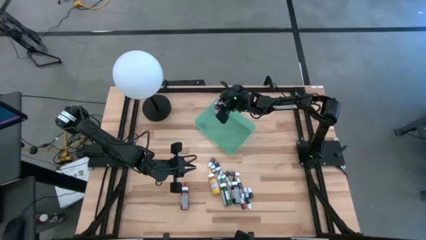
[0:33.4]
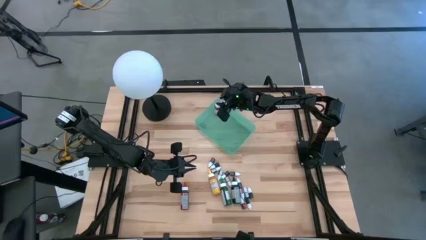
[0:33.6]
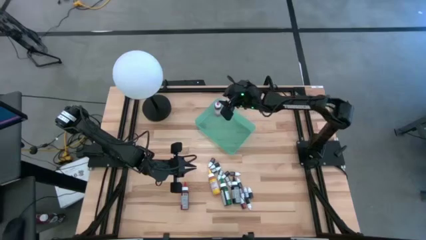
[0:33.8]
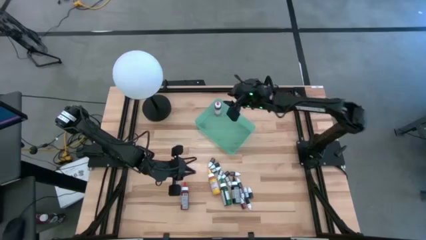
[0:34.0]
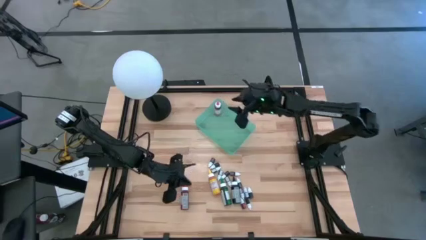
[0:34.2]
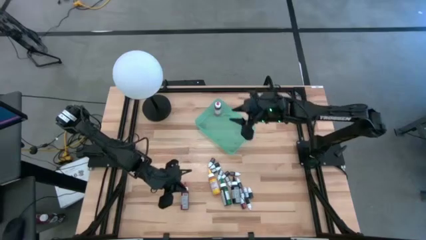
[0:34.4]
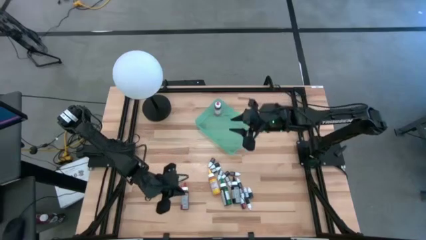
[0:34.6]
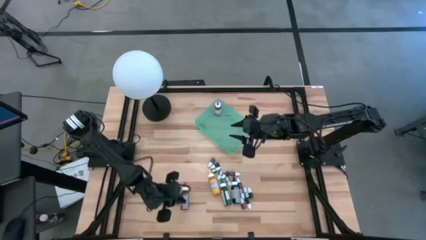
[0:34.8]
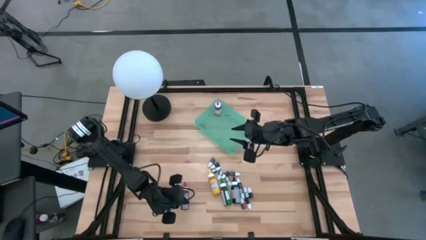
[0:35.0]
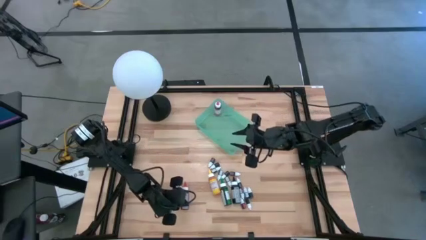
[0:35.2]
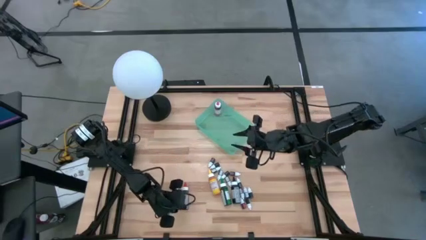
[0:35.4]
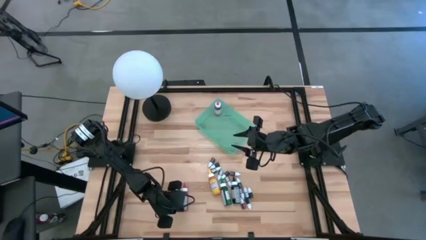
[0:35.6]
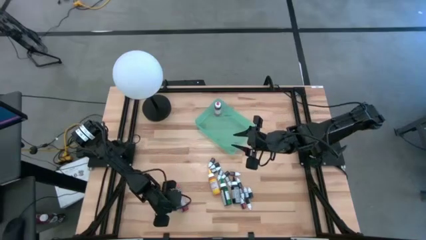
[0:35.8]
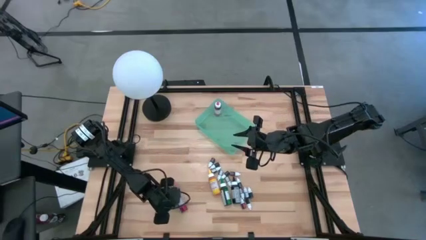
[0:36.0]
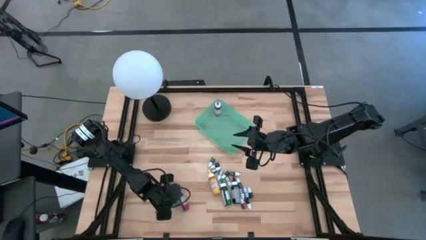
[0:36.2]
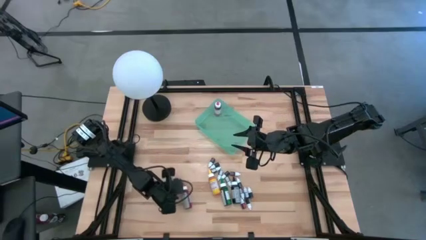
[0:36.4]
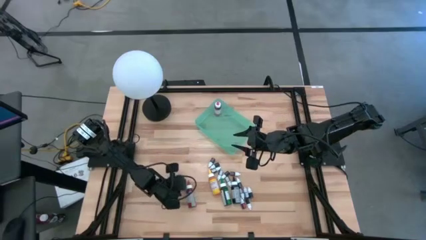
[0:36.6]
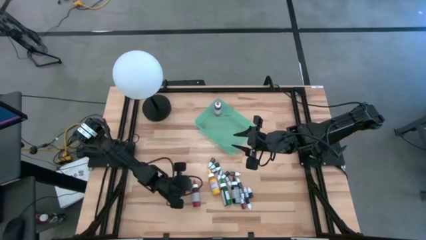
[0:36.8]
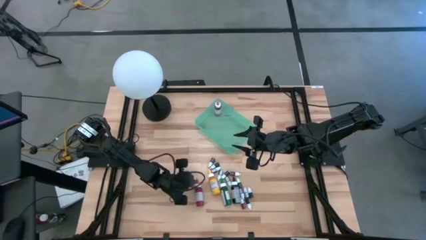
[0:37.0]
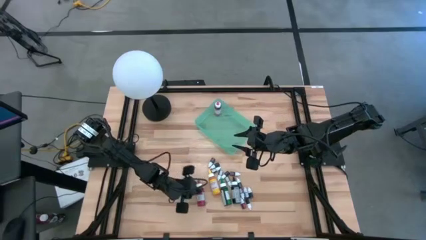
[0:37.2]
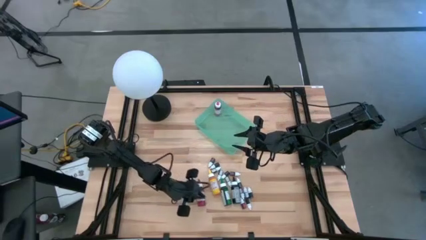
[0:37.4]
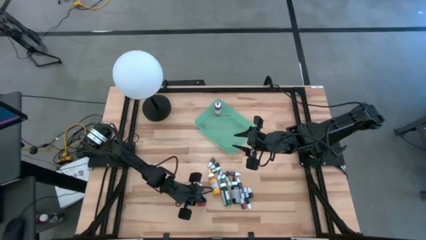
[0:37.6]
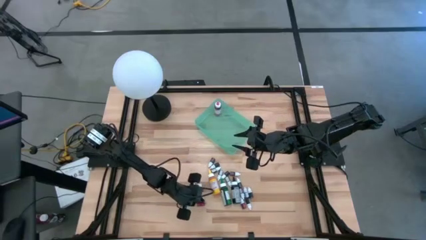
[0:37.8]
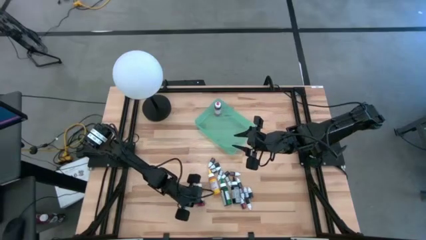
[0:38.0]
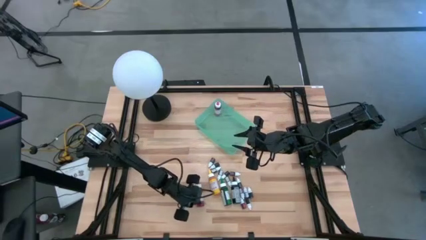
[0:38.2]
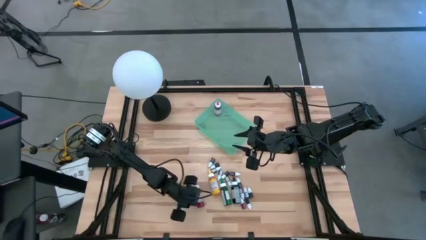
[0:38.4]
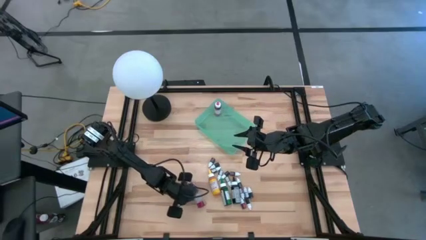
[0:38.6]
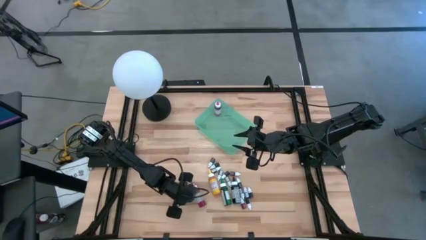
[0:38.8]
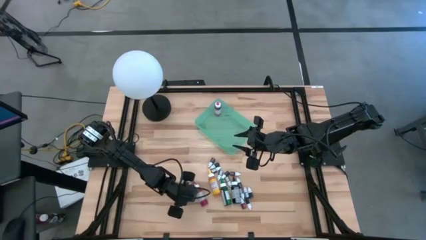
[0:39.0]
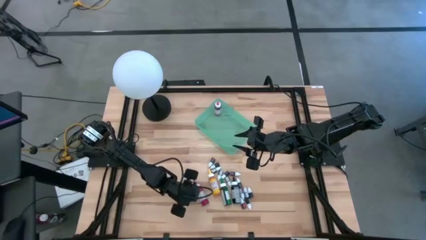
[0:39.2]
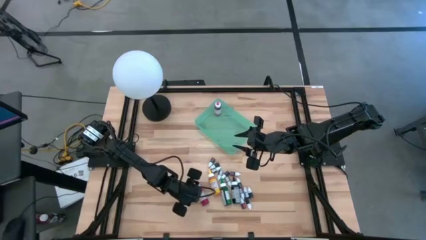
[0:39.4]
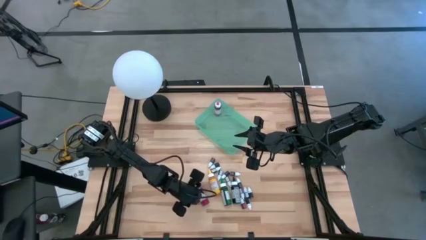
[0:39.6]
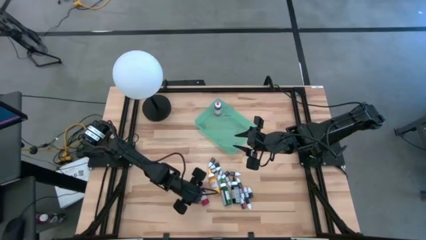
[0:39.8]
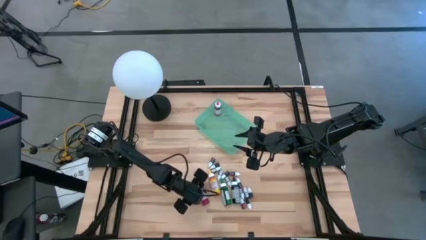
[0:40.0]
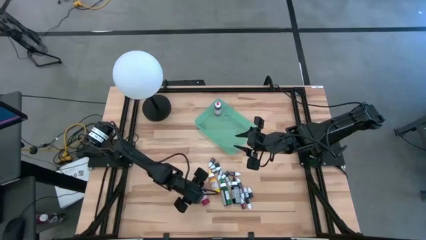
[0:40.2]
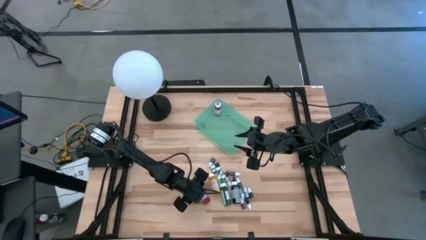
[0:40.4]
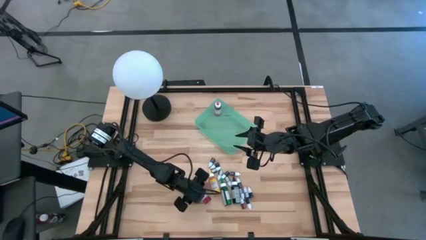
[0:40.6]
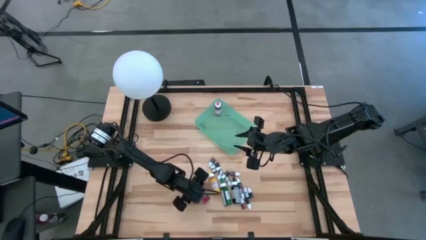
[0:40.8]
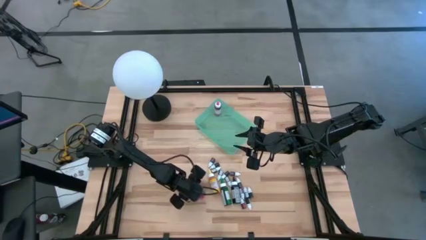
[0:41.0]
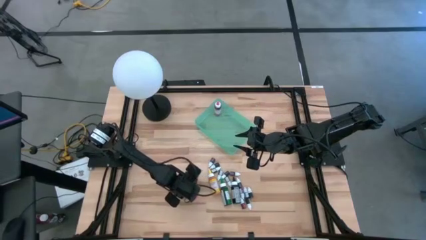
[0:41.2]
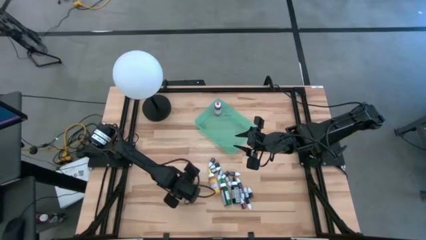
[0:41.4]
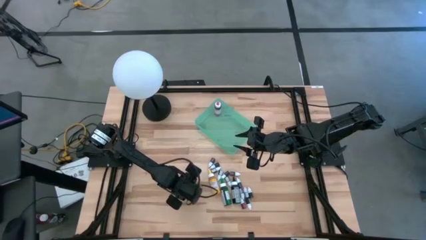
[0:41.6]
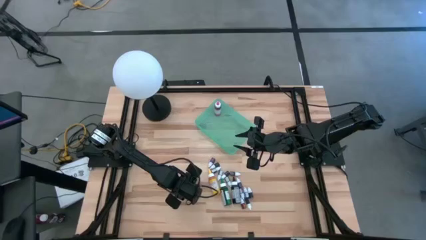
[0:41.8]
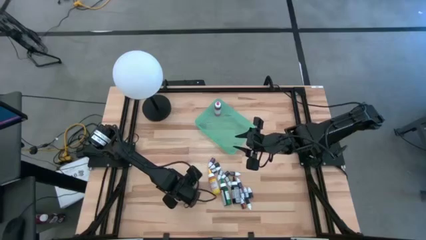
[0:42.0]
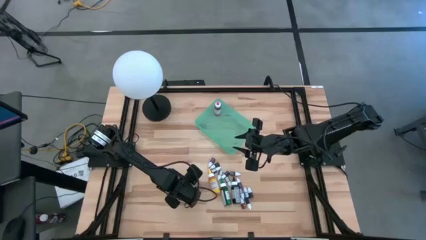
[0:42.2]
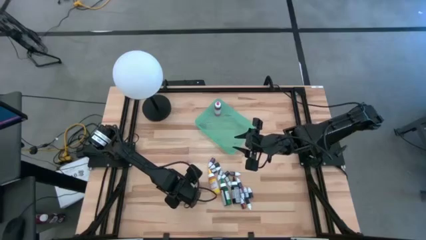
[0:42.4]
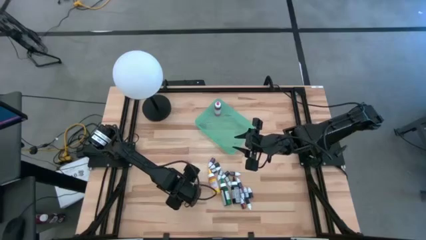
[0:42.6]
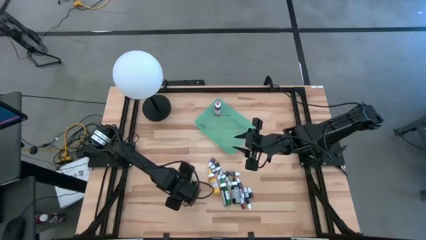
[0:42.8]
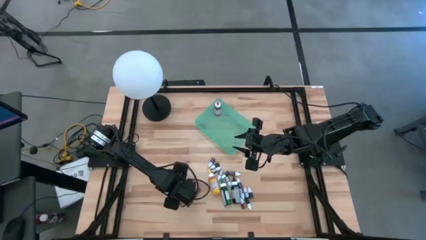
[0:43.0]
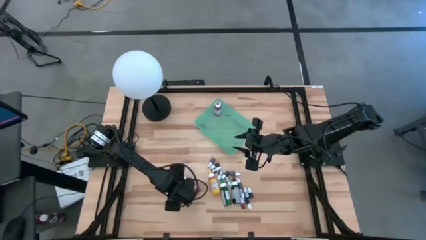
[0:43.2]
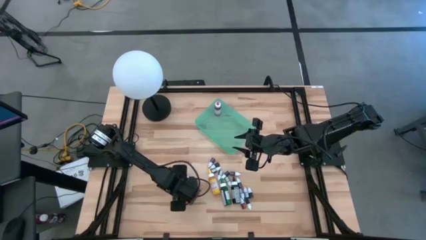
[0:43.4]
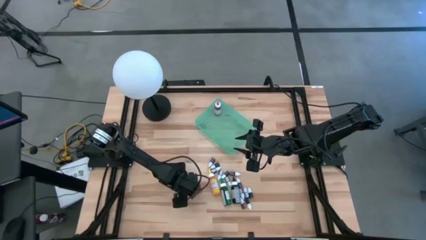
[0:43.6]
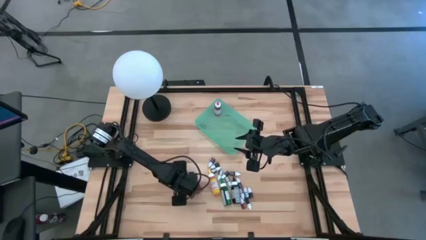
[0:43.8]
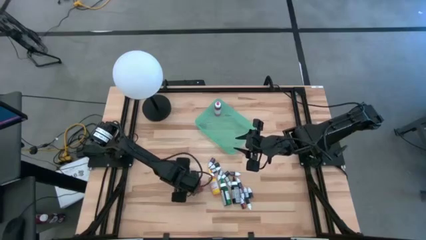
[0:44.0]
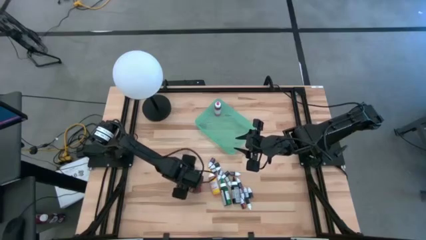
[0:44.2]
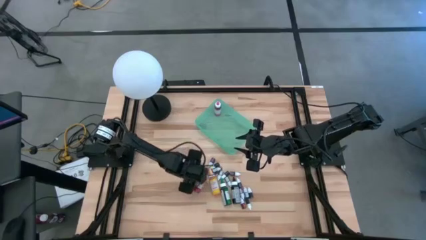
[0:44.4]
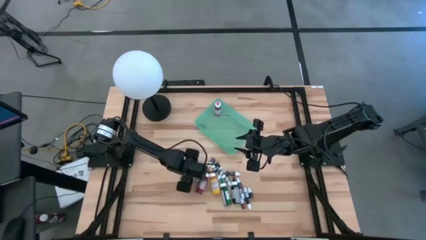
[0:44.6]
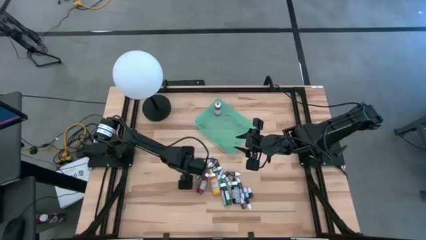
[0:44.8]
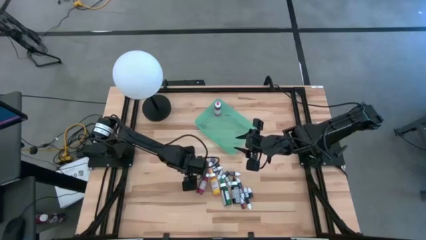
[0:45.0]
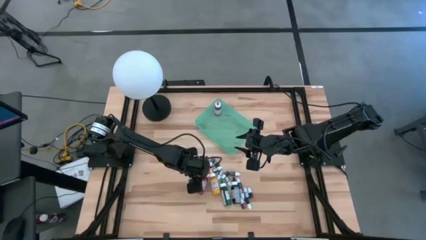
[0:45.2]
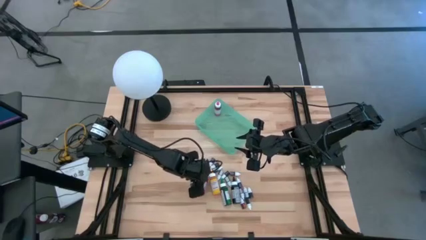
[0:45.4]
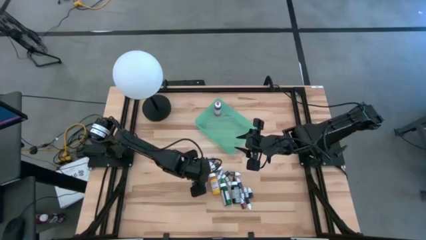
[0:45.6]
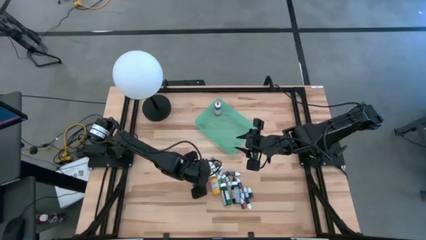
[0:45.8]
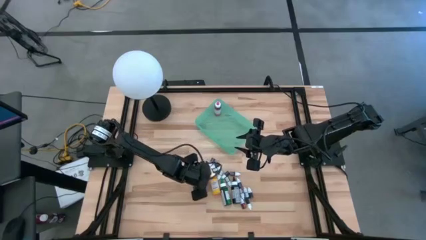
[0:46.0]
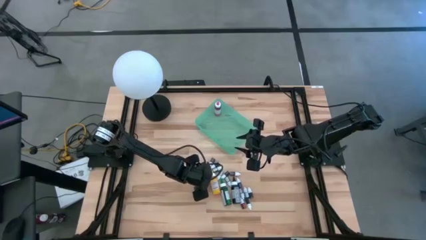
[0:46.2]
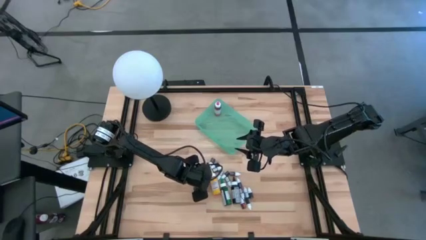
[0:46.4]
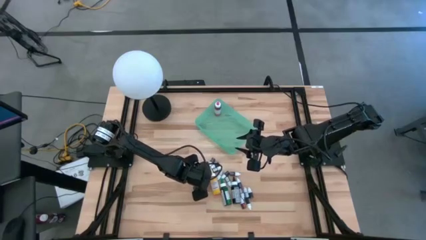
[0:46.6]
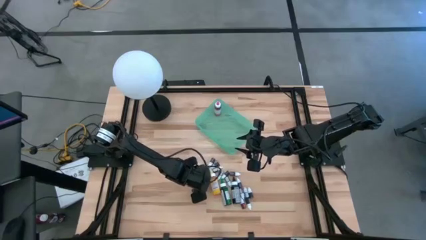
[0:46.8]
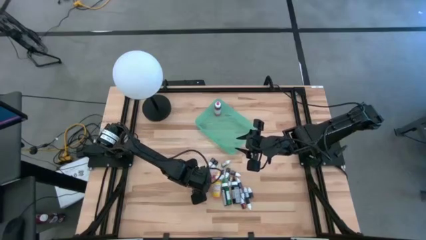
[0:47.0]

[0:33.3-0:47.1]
Task: Pick & Place food coloring
Put the large red food coloring bottle into the green bin
